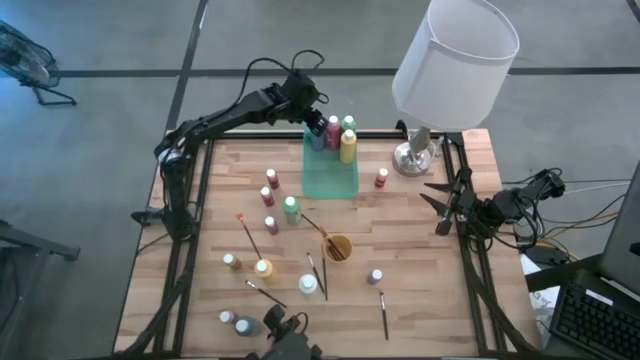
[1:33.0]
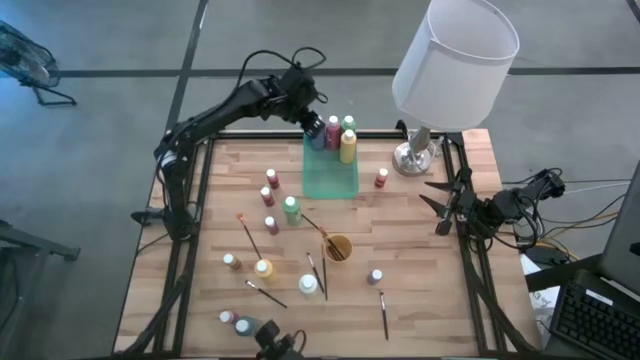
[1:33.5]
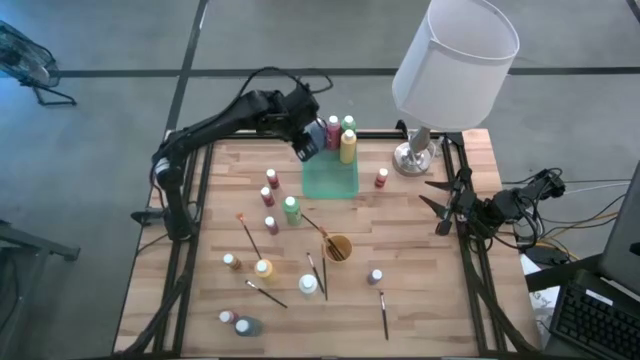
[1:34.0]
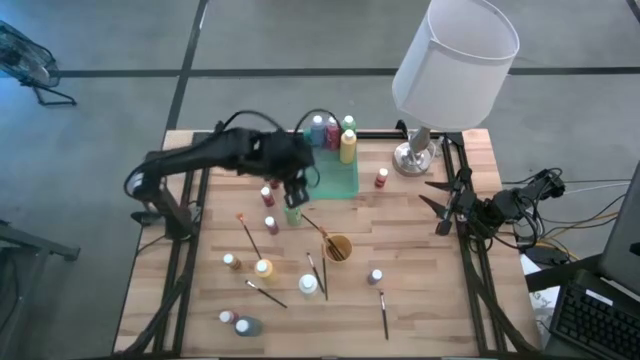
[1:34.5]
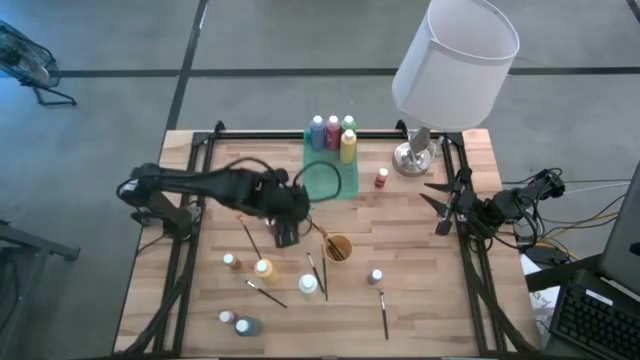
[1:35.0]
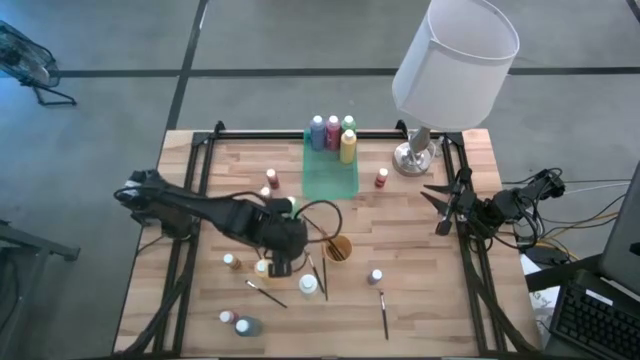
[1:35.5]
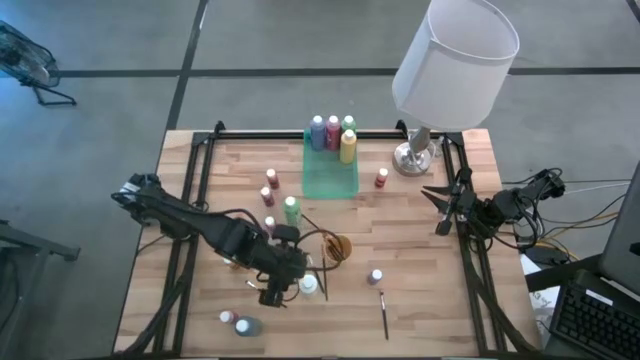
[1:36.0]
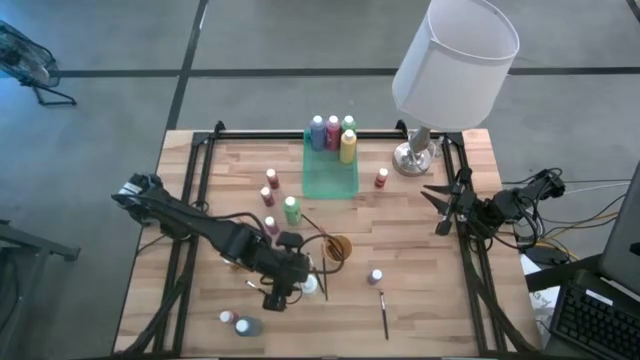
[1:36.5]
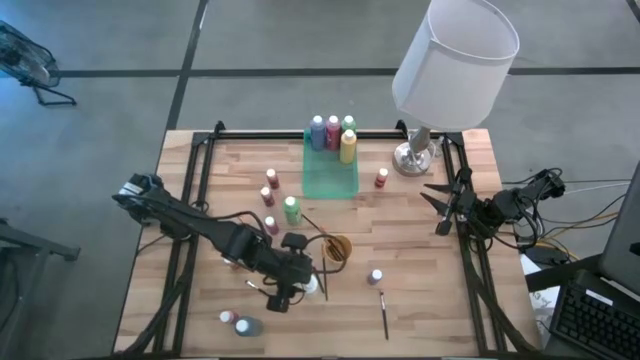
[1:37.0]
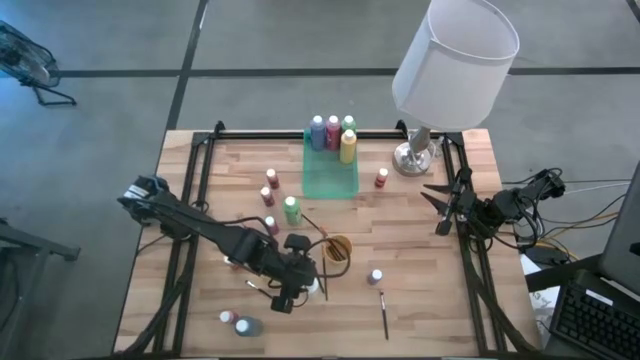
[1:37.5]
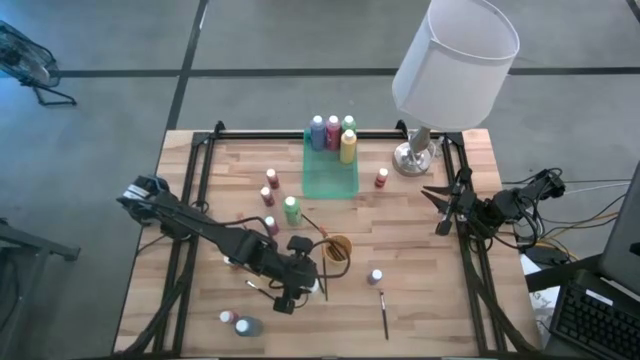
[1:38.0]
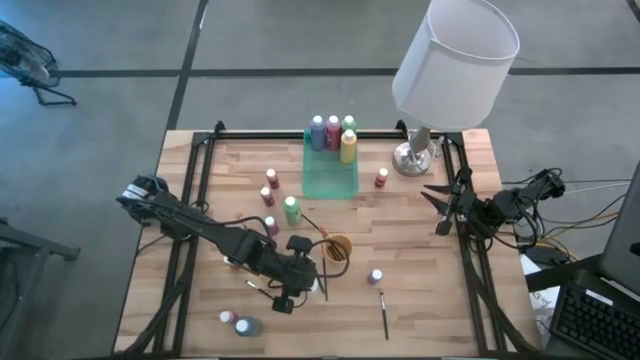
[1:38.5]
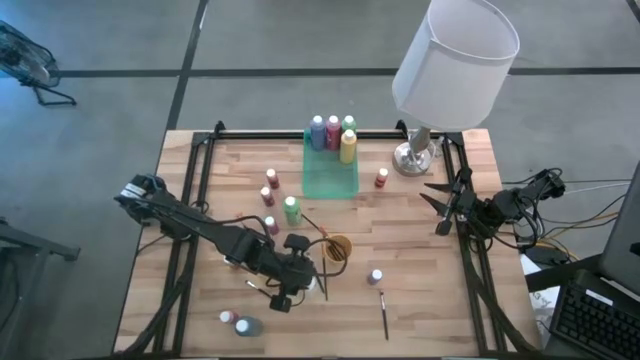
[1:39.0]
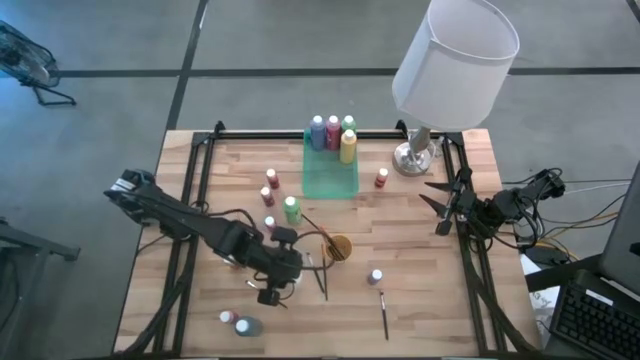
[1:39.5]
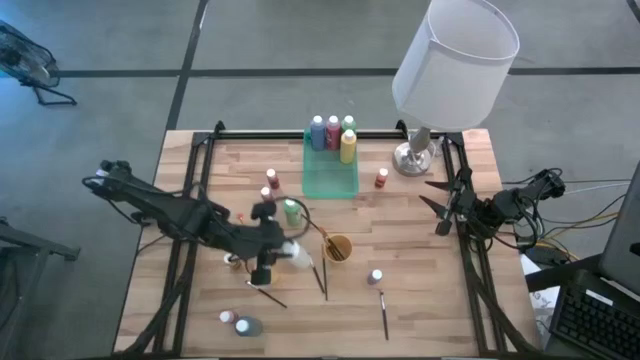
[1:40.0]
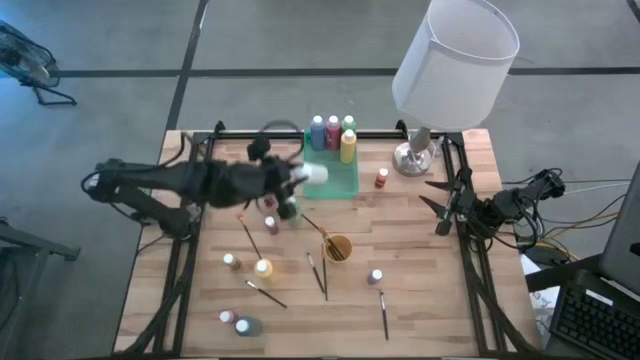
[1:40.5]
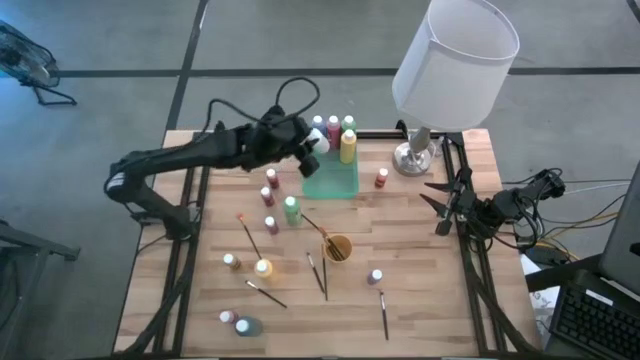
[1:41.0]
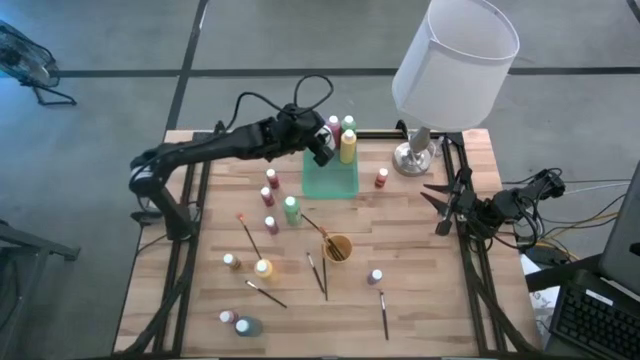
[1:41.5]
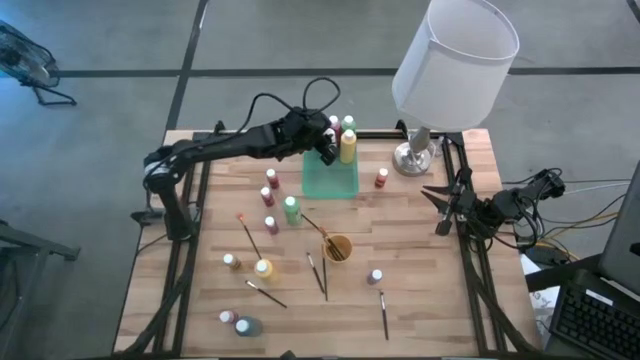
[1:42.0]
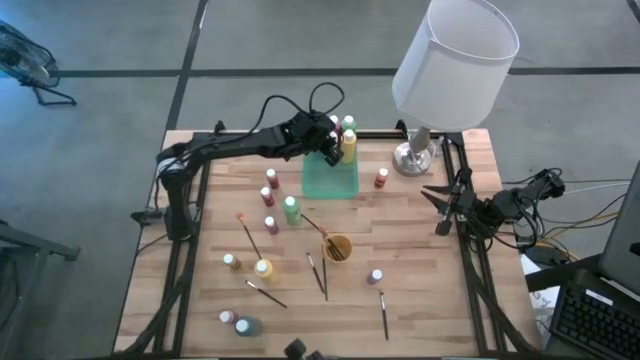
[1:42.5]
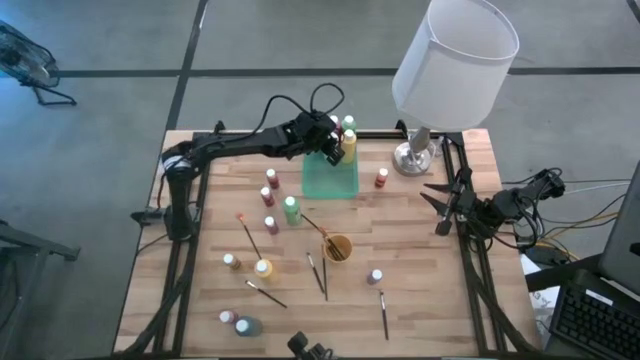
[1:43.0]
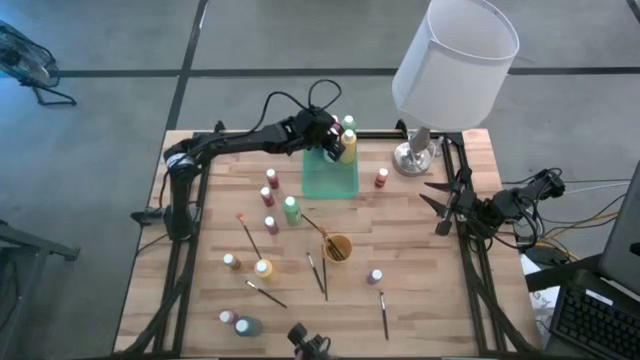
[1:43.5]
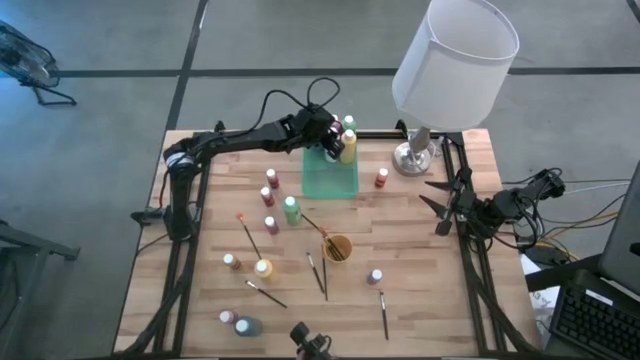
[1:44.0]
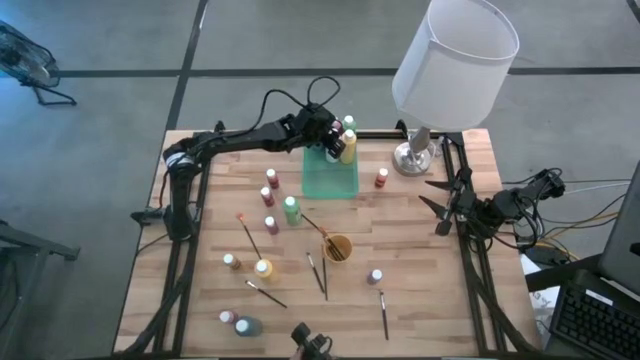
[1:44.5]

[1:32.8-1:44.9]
Task: Pick & Place Paint Supplies
Put the white paint bottle into the green bin

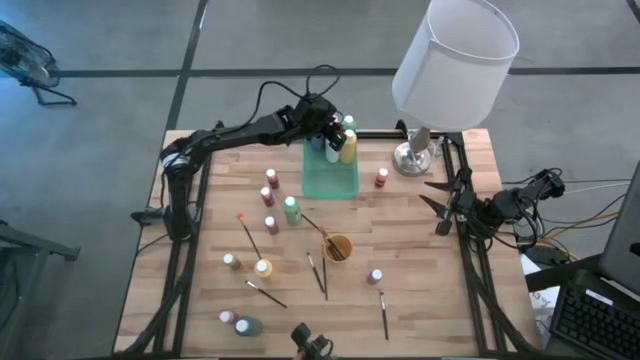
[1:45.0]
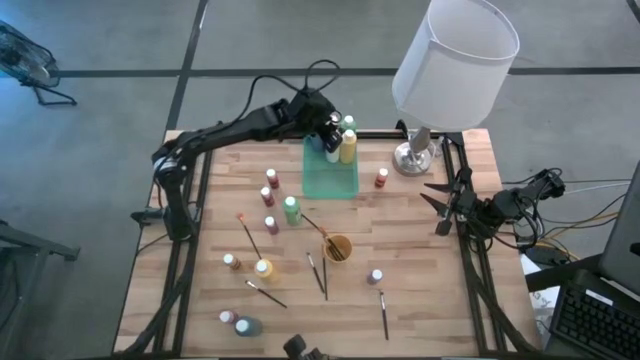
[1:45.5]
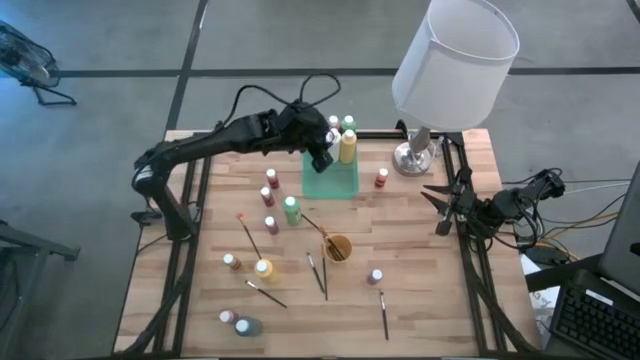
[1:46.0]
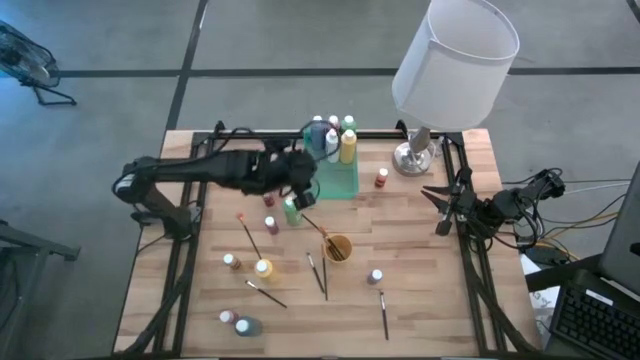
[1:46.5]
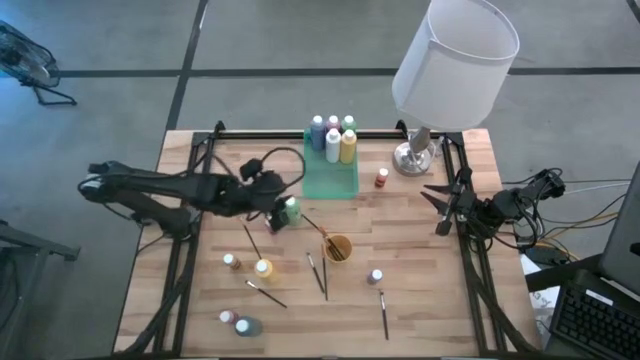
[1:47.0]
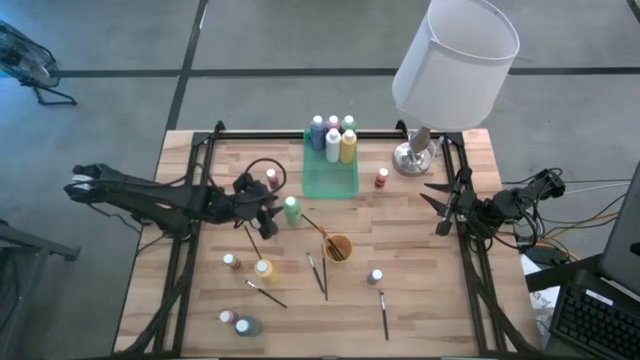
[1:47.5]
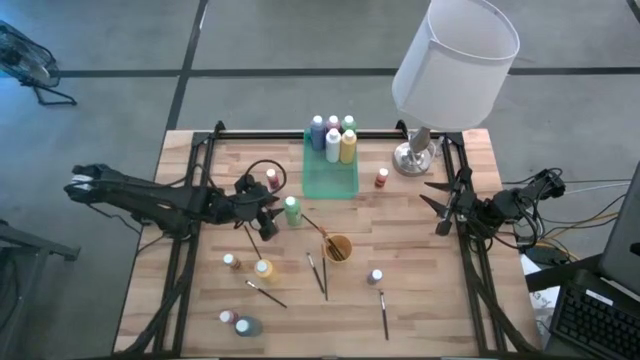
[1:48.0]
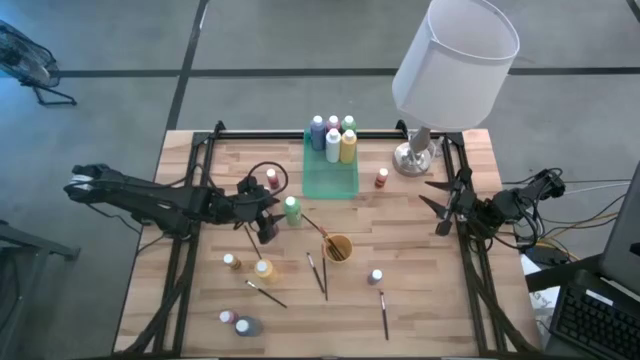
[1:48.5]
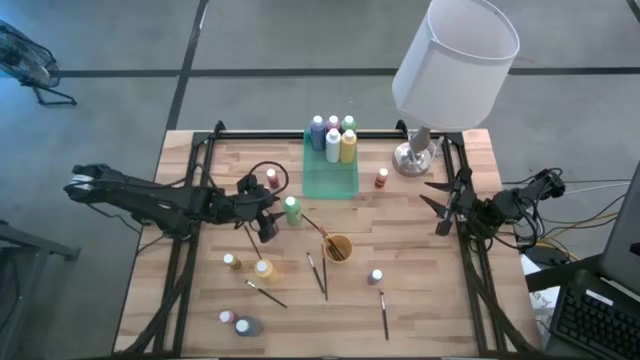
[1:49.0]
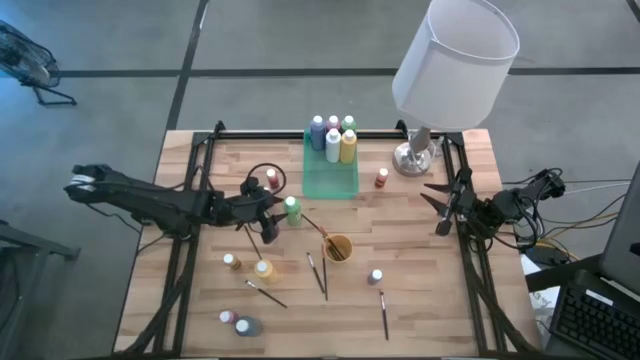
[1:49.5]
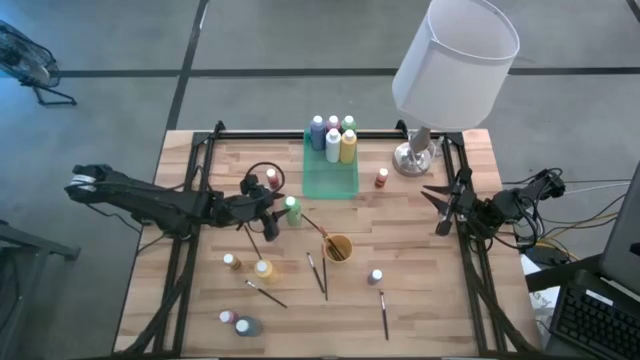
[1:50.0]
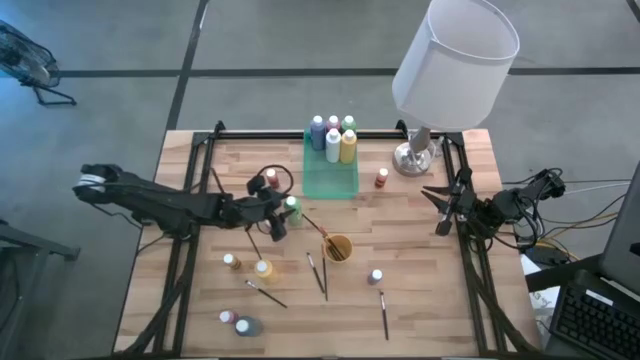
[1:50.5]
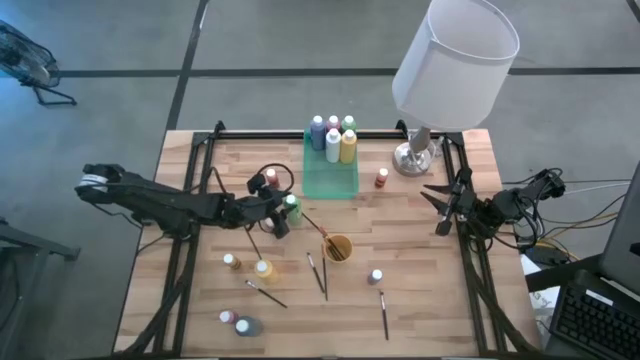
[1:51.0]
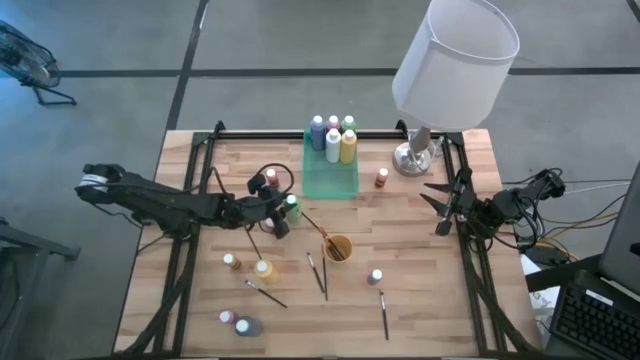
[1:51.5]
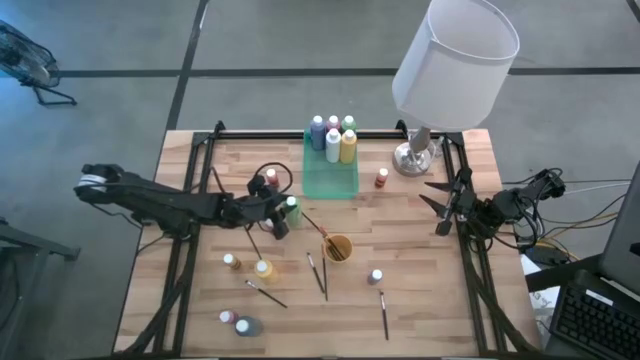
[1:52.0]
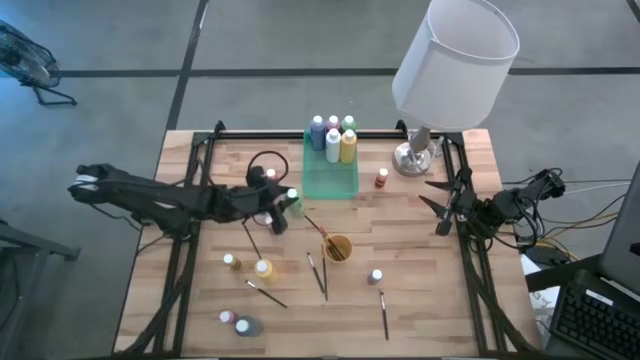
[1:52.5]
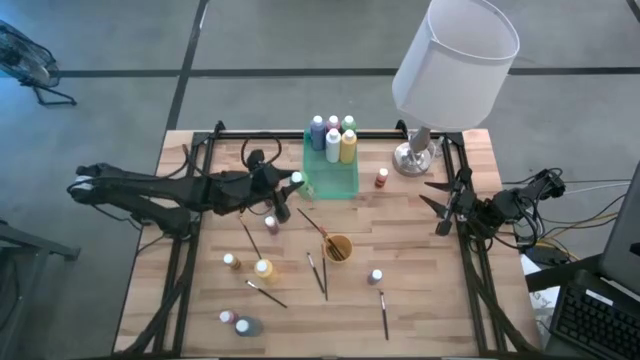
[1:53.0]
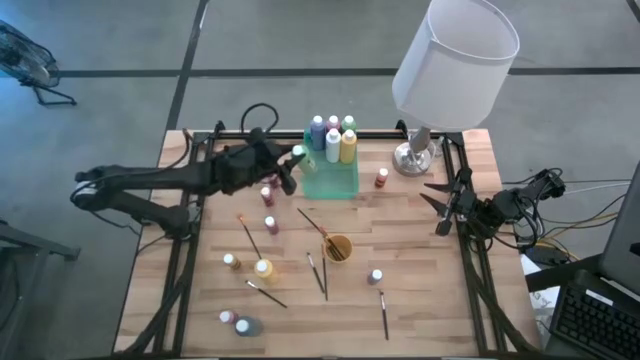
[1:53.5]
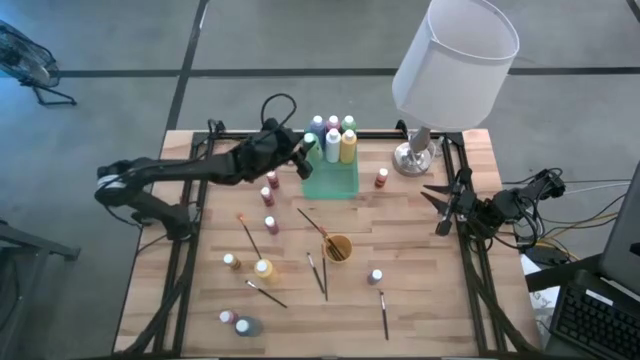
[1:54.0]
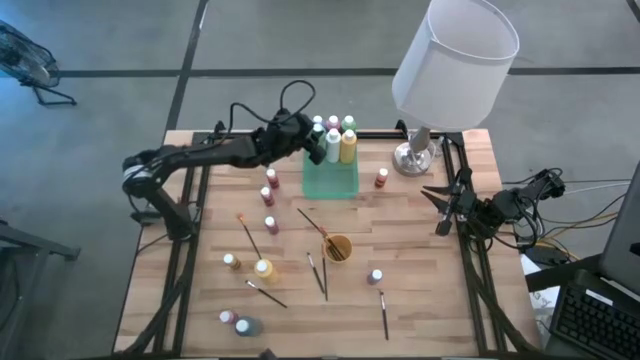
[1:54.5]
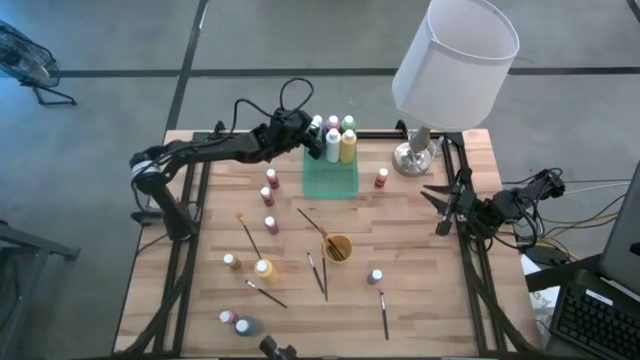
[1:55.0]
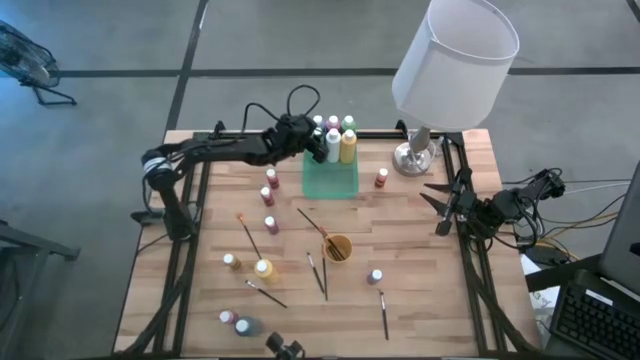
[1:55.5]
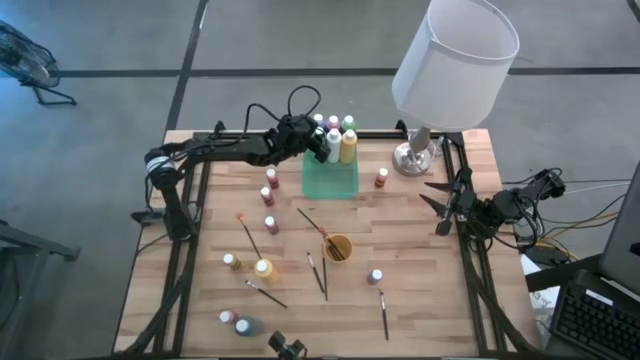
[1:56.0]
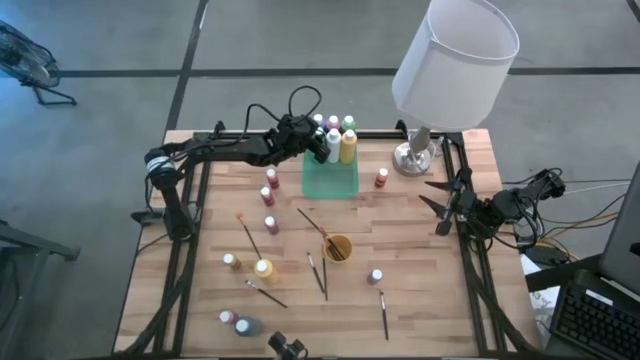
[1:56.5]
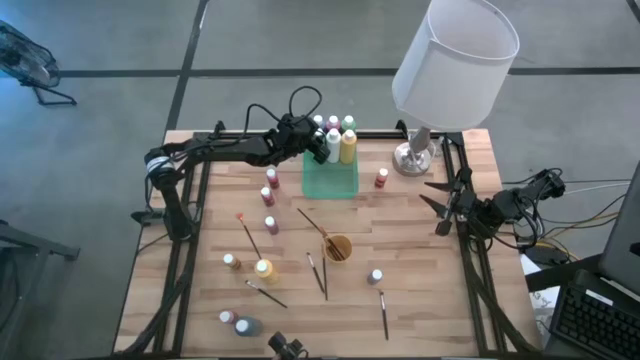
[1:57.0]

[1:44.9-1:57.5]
Put the green paint bottle into the green bin
